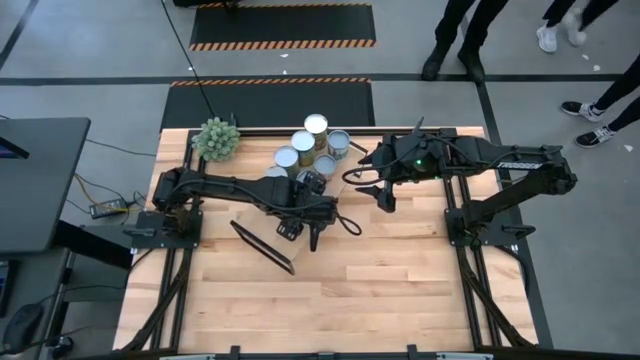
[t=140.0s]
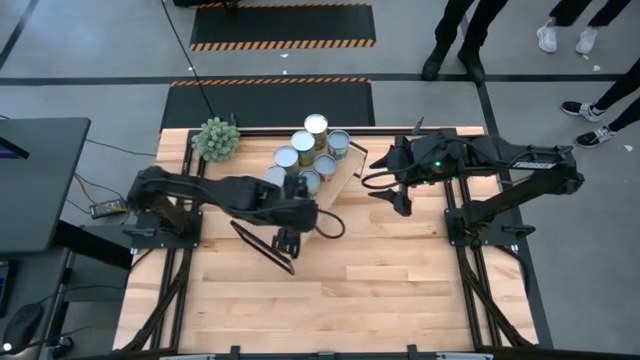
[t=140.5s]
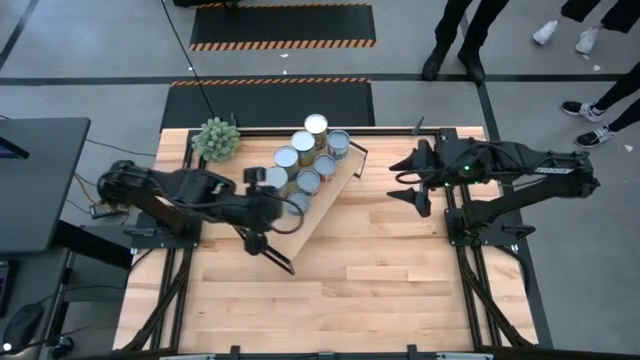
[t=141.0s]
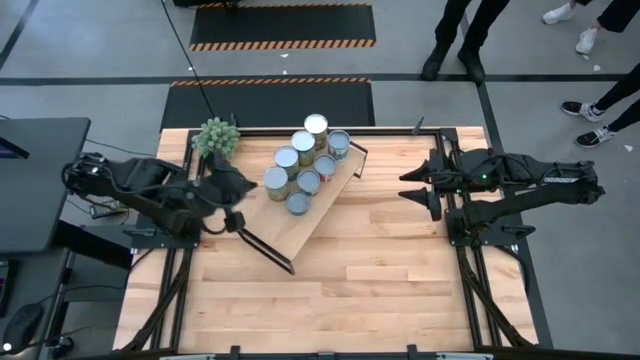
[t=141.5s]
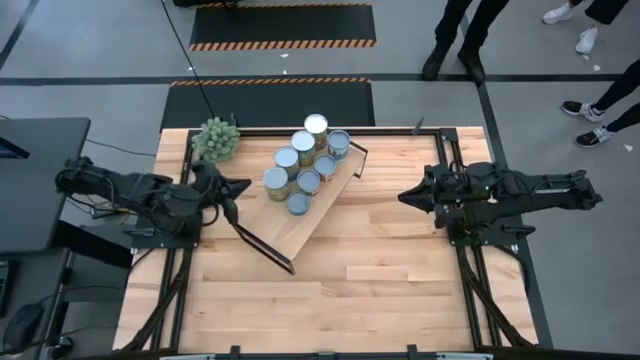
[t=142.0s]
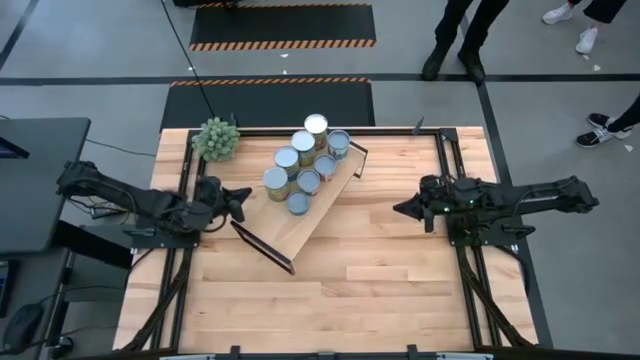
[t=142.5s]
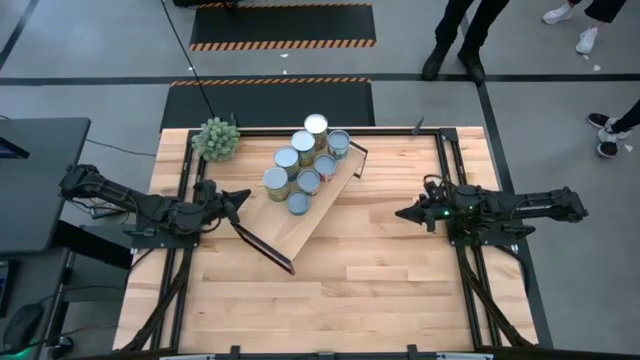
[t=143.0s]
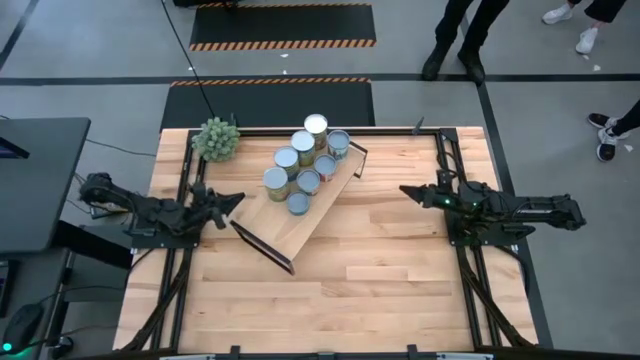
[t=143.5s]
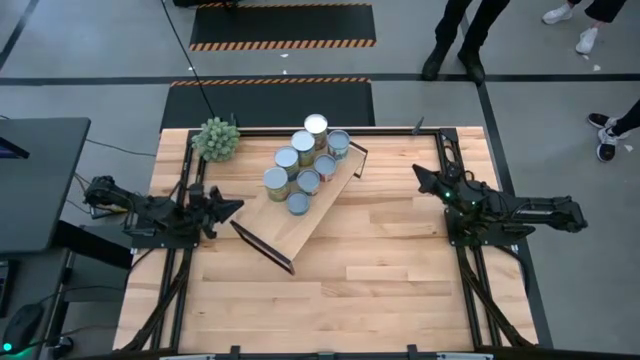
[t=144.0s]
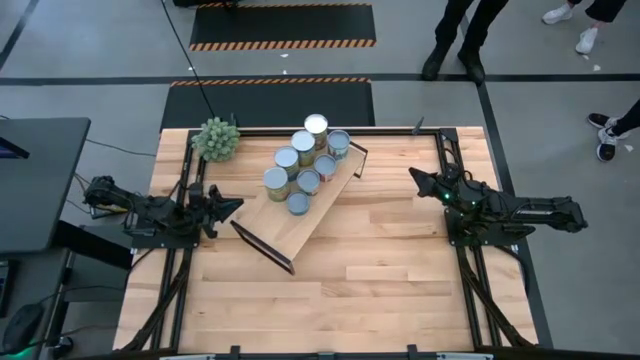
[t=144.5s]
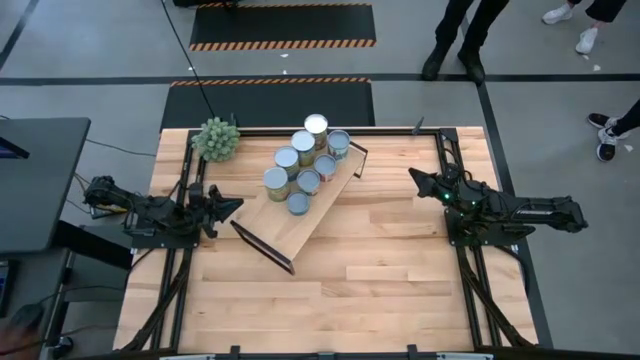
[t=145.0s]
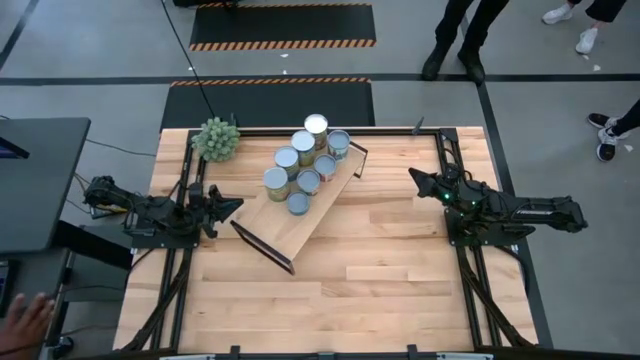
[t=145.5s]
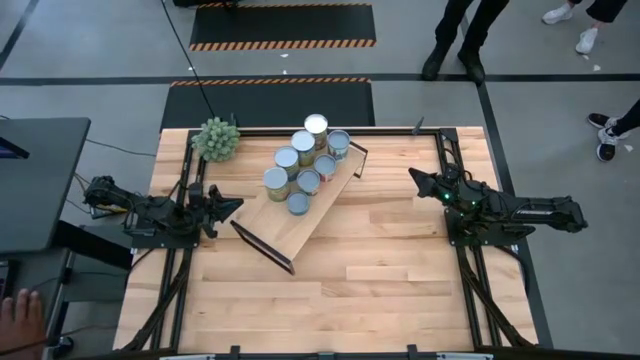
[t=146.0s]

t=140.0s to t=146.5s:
Task: Pick and place cans onto a shelf
Return to Home Position

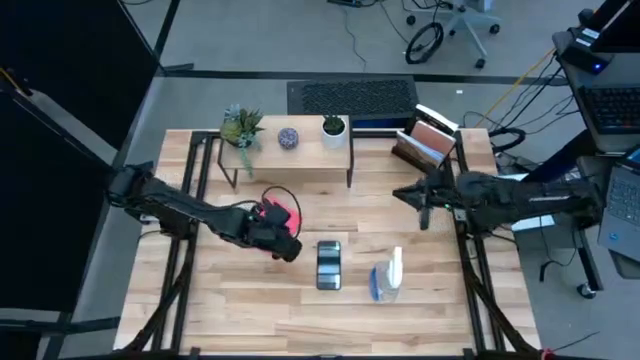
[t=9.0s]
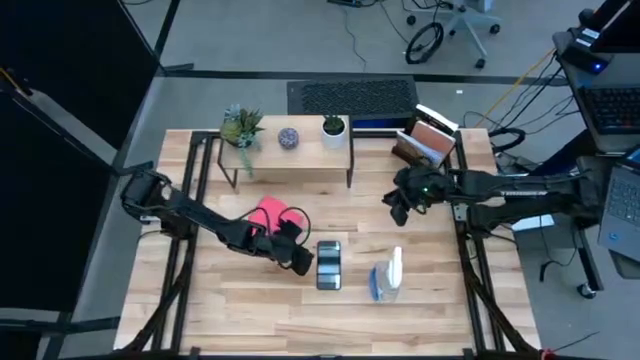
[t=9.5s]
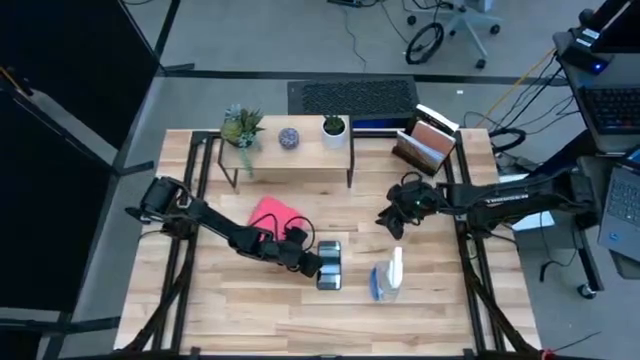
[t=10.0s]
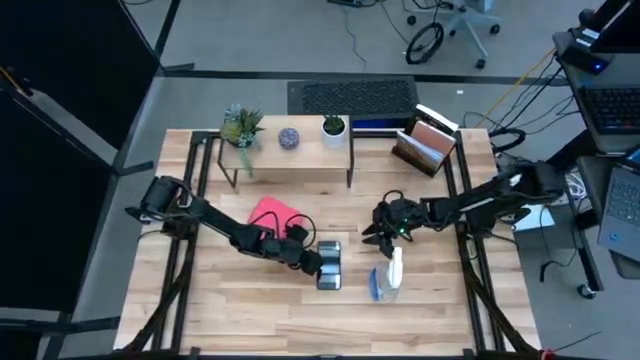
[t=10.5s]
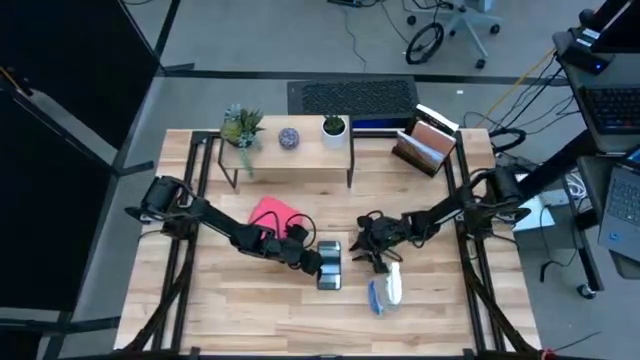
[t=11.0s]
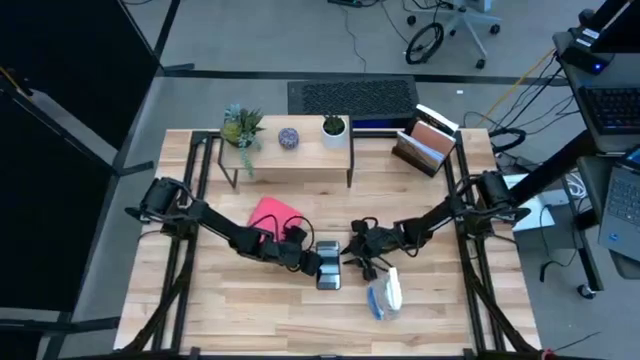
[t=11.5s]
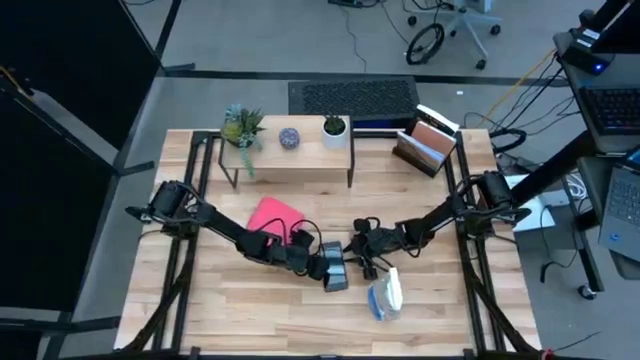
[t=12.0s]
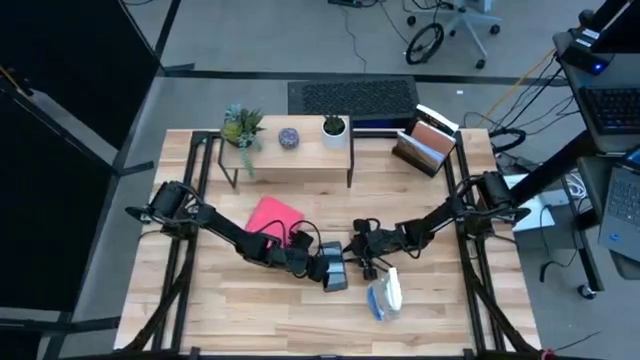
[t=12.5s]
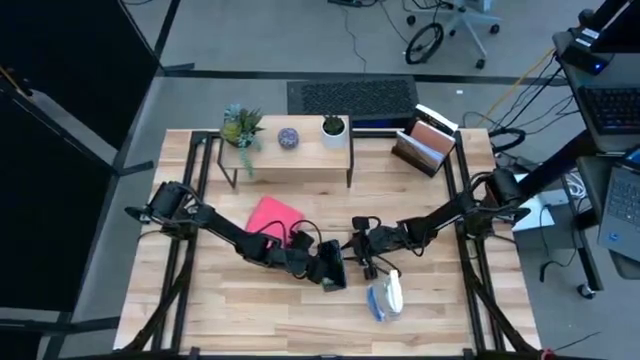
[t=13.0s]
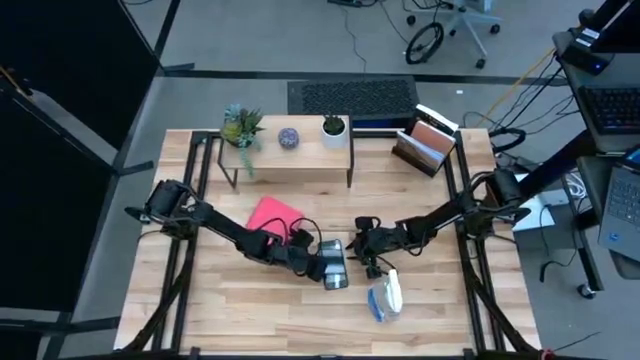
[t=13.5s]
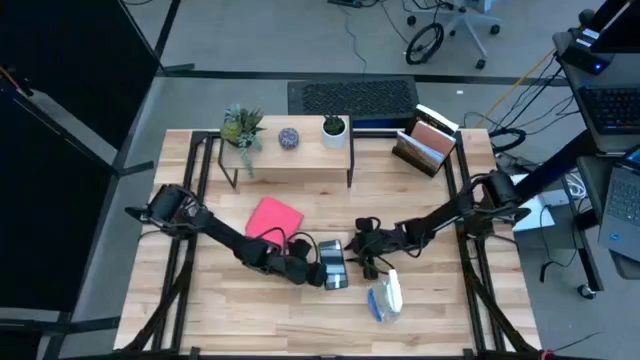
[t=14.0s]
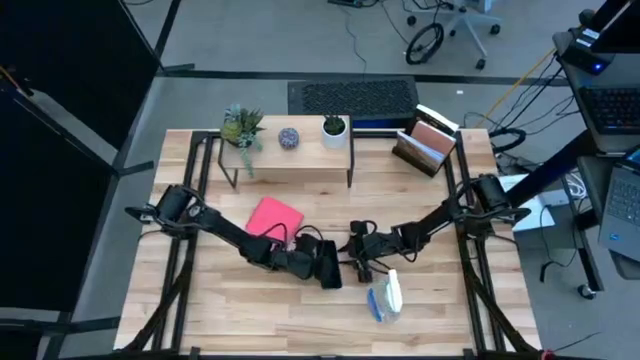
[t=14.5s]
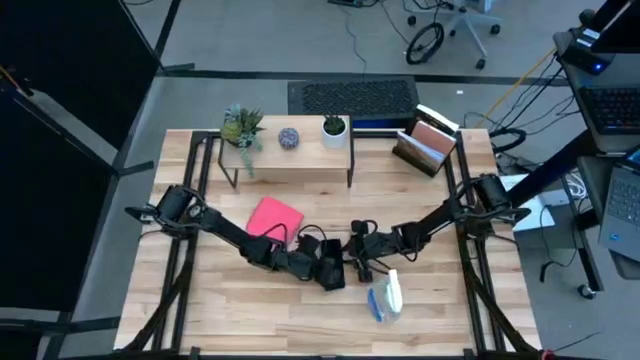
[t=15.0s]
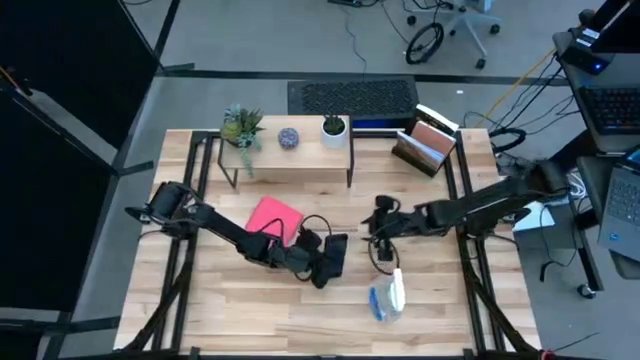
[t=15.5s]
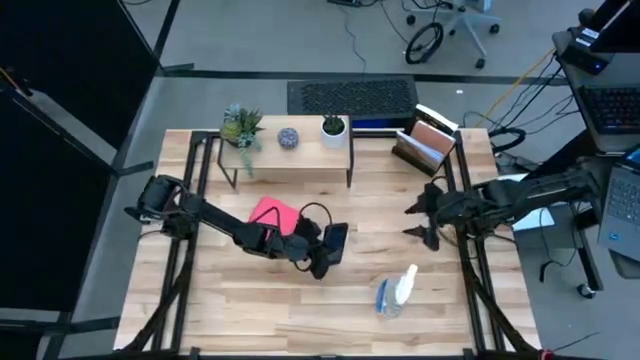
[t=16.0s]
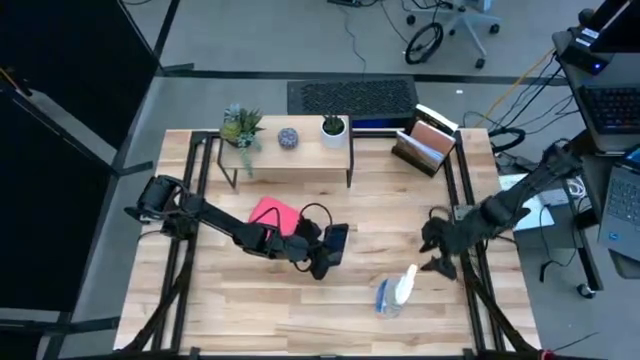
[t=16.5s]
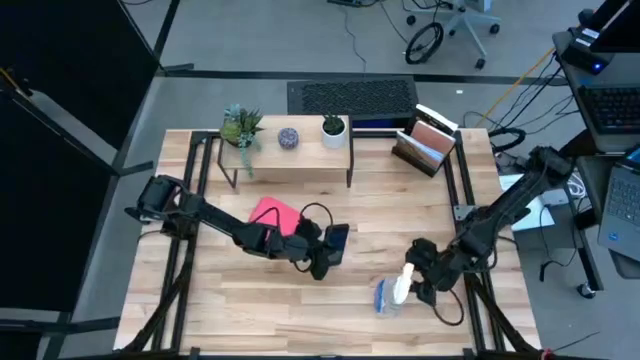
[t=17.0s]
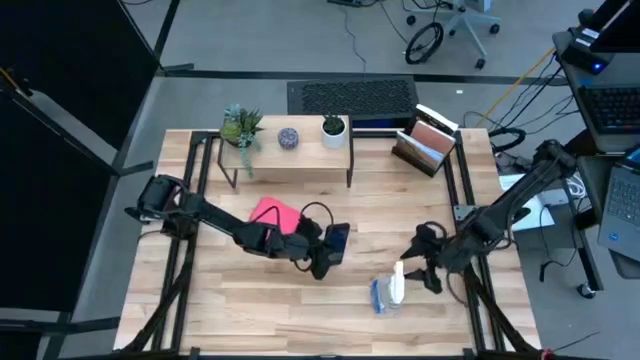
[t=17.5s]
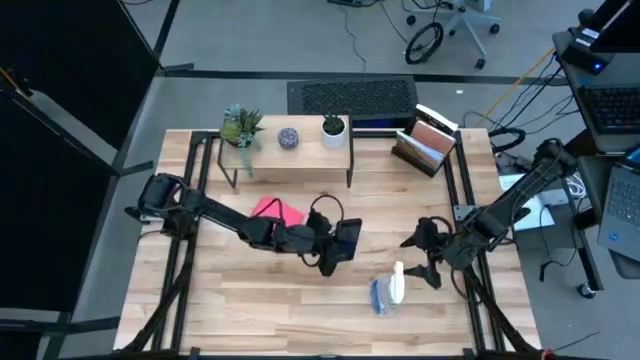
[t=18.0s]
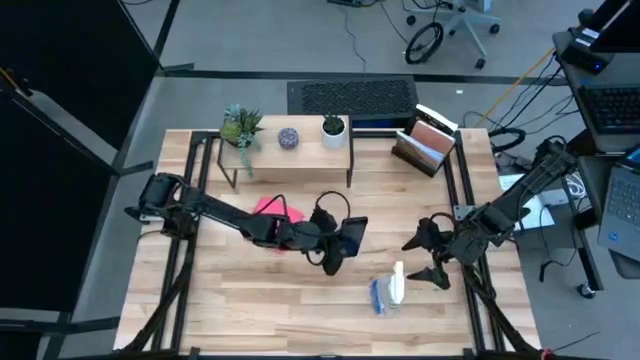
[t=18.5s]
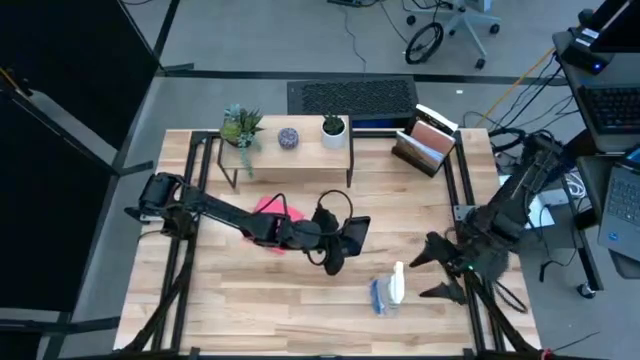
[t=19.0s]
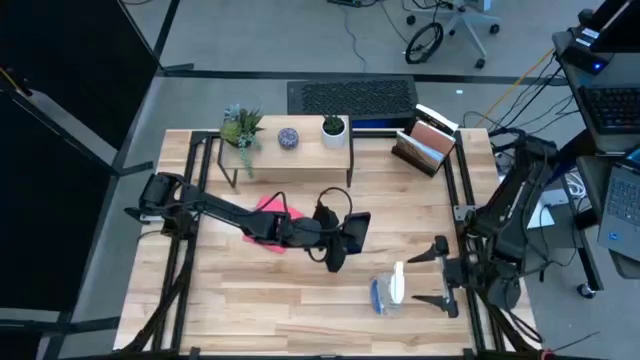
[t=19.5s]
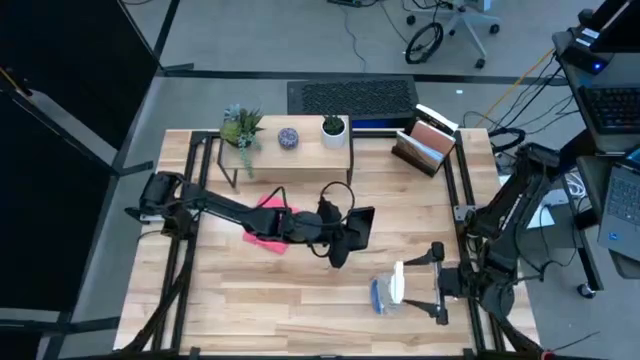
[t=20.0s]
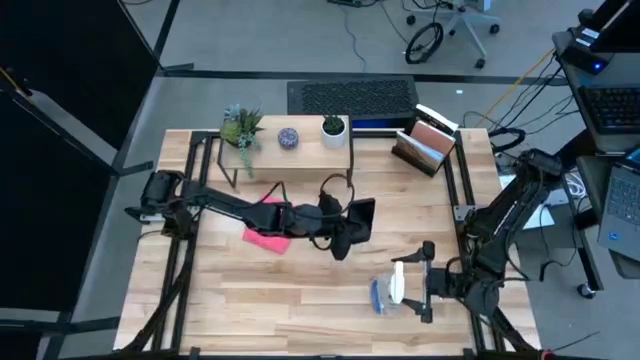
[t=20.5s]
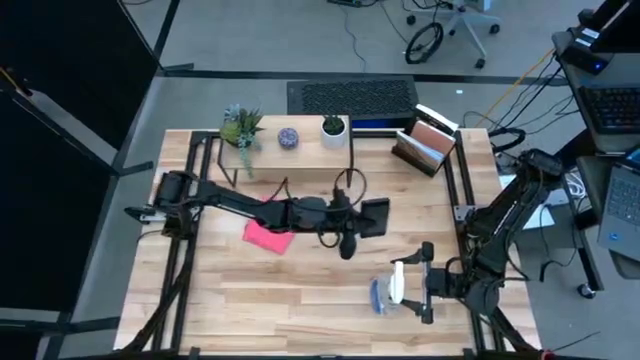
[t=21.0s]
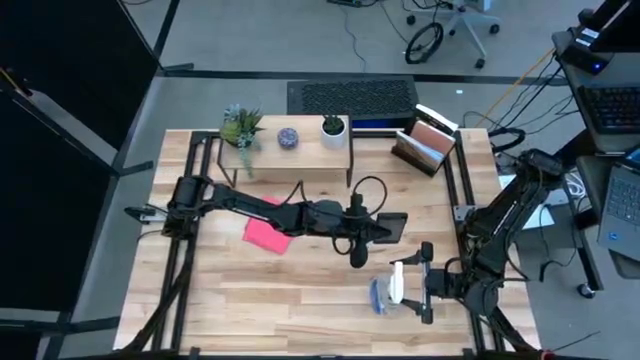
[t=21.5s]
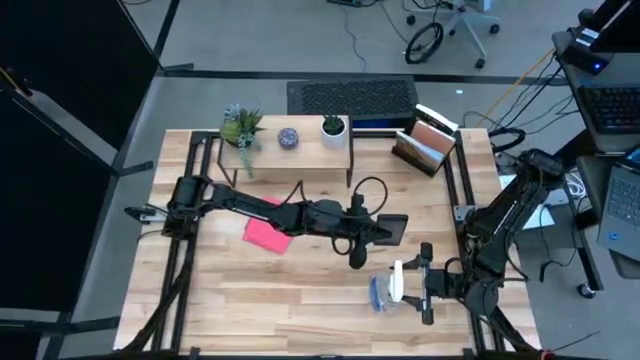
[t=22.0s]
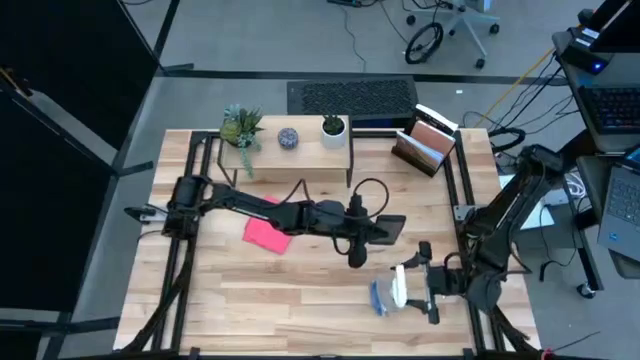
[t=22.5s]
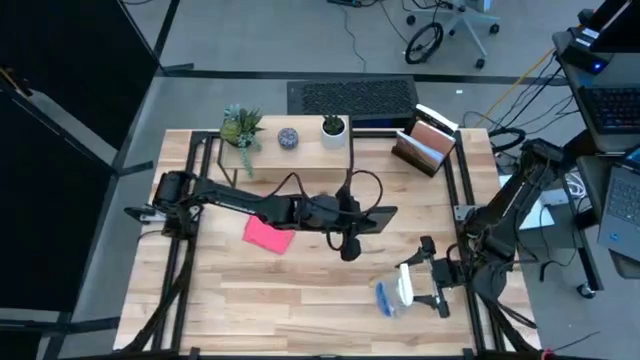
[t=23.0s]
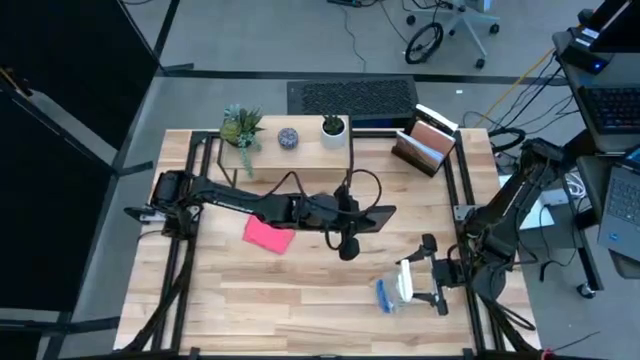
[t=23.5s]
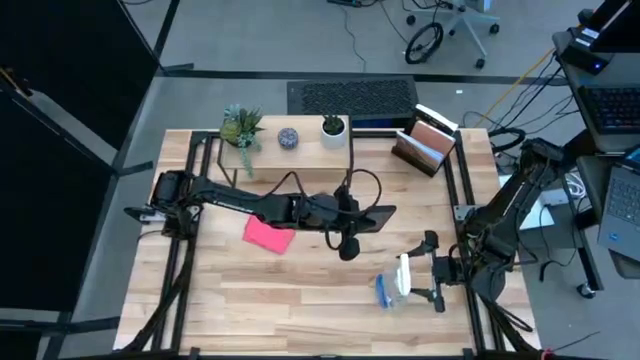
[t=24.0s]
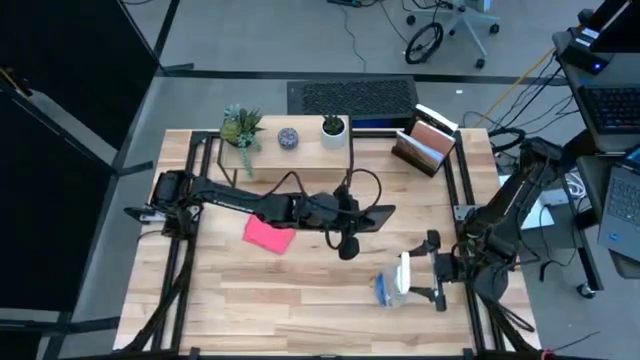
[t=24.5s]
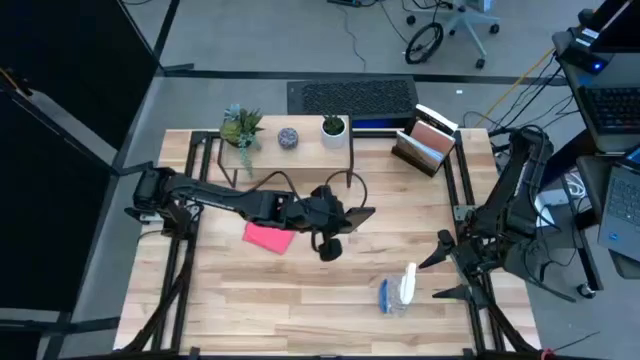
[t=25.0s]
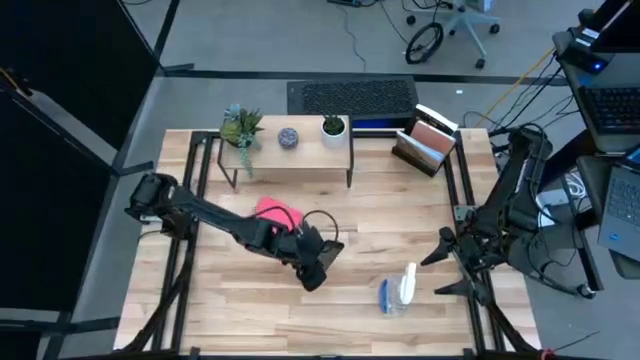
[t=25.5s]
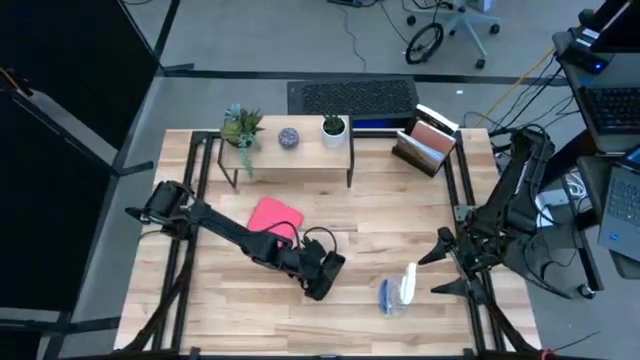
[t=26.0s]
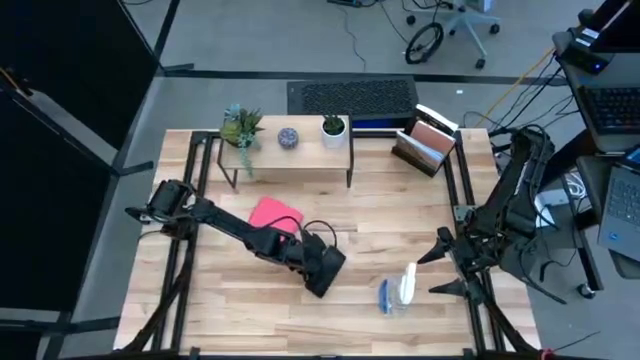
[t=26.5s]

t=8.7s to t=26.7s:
Task: Apply microfiber cloth
Spray the front of the cellphone using the spray bottle
